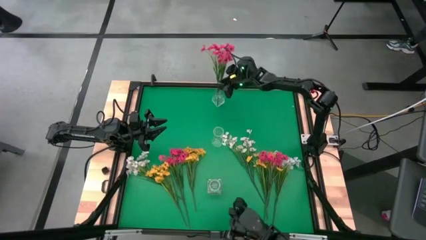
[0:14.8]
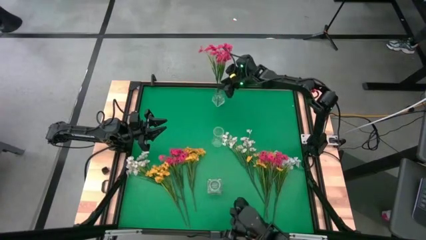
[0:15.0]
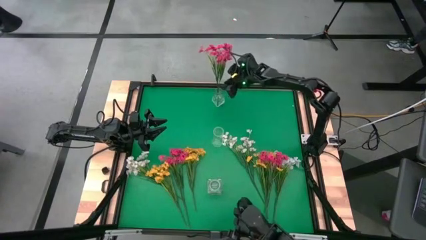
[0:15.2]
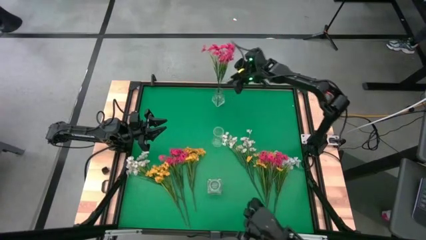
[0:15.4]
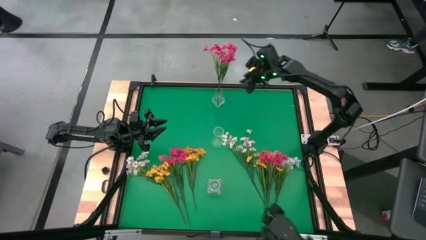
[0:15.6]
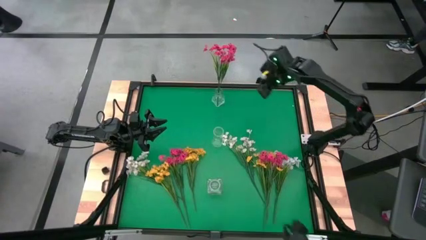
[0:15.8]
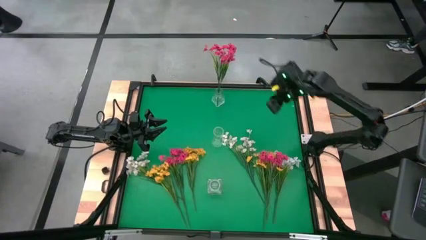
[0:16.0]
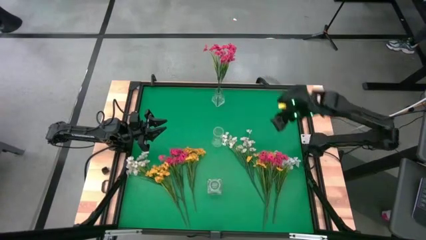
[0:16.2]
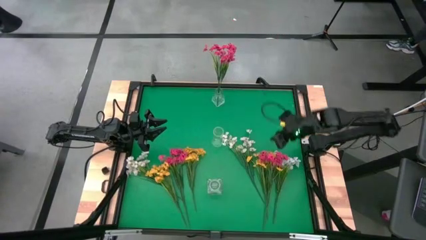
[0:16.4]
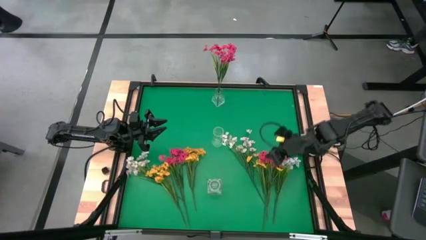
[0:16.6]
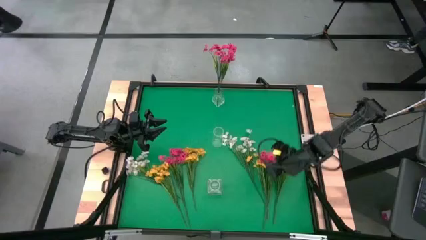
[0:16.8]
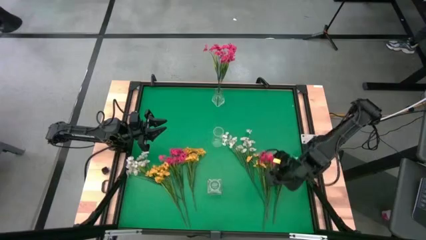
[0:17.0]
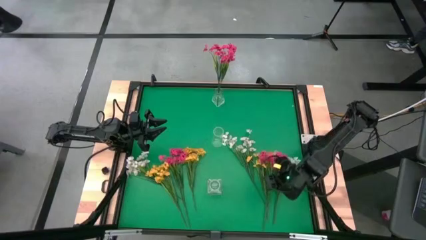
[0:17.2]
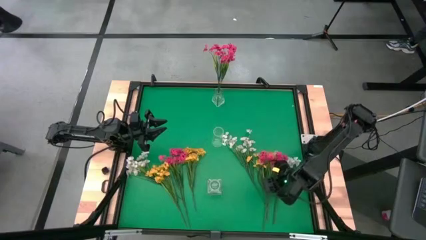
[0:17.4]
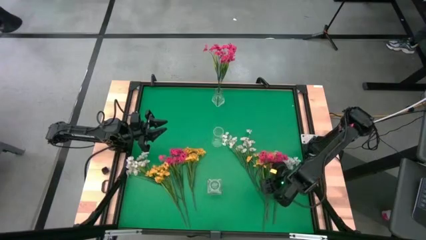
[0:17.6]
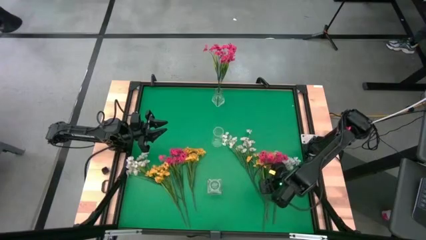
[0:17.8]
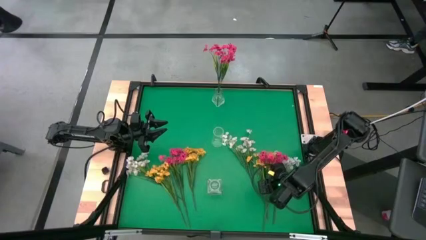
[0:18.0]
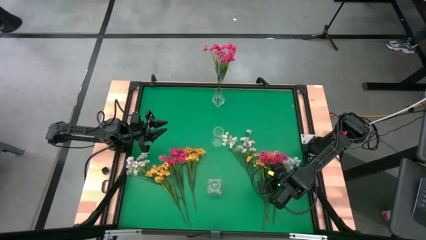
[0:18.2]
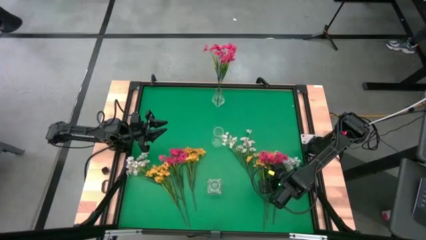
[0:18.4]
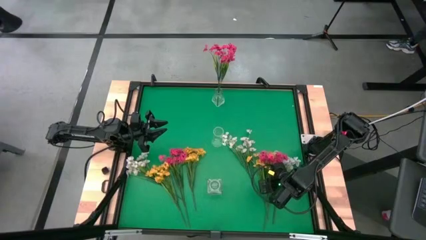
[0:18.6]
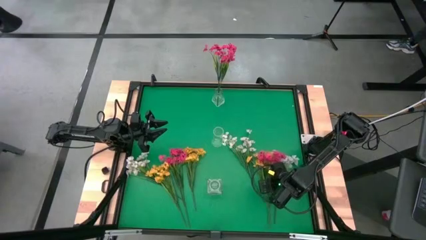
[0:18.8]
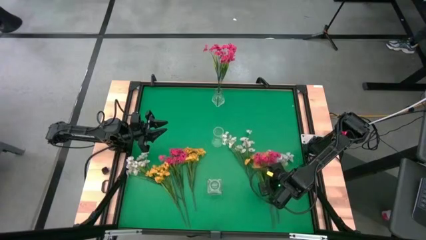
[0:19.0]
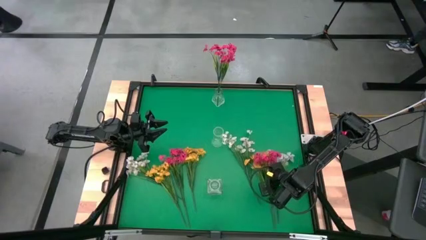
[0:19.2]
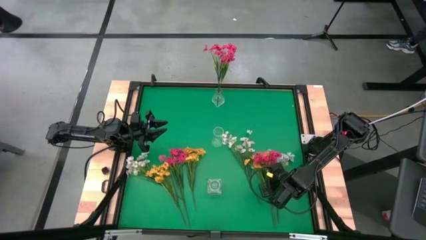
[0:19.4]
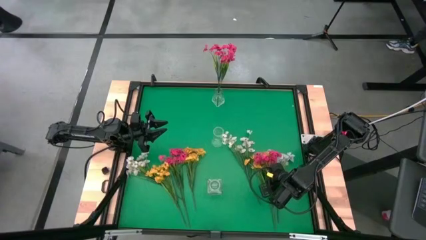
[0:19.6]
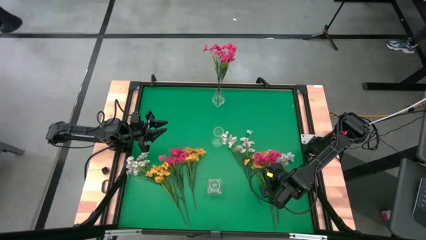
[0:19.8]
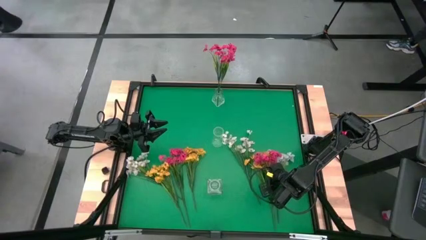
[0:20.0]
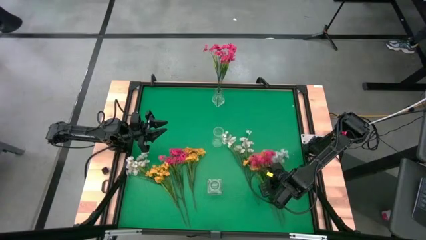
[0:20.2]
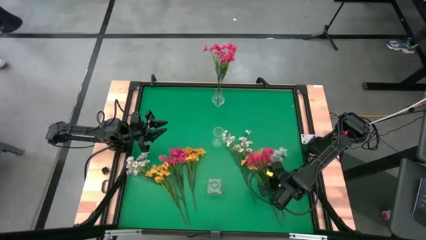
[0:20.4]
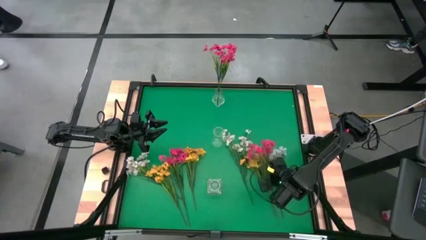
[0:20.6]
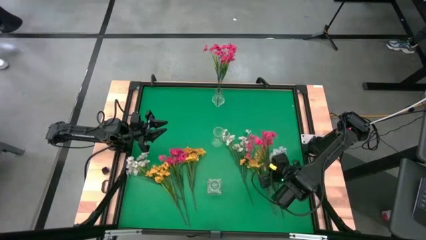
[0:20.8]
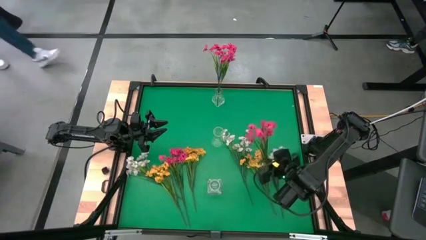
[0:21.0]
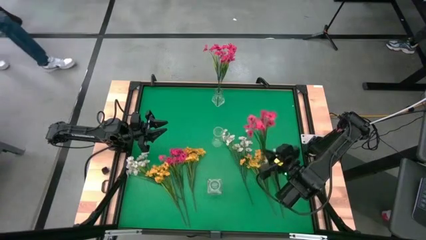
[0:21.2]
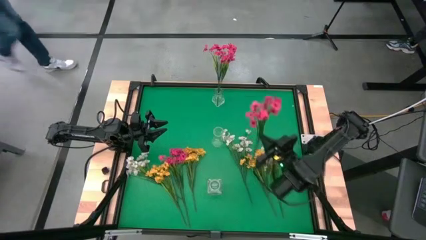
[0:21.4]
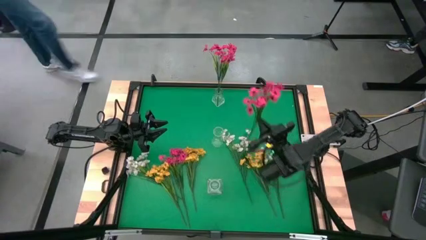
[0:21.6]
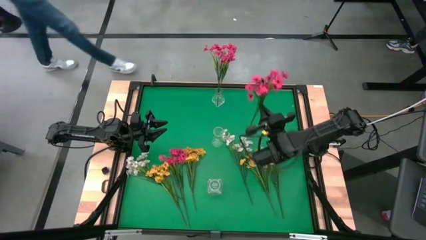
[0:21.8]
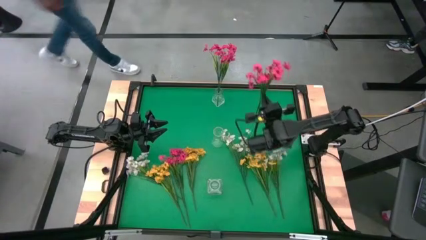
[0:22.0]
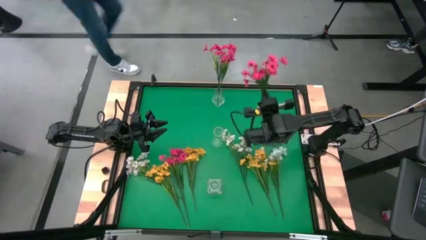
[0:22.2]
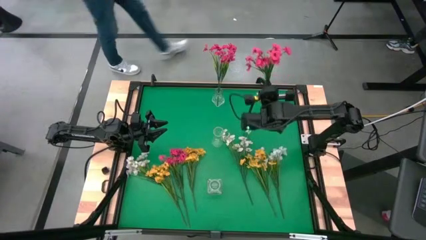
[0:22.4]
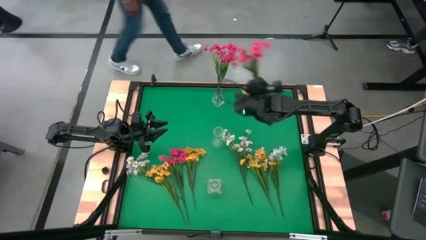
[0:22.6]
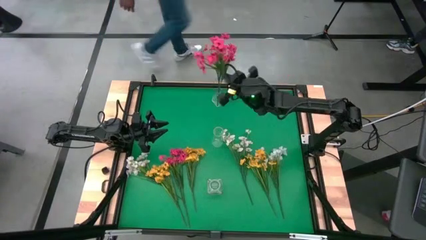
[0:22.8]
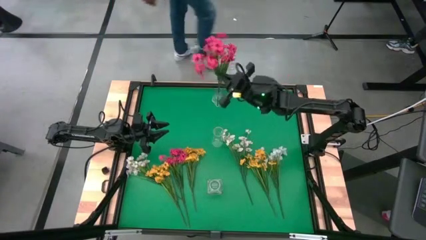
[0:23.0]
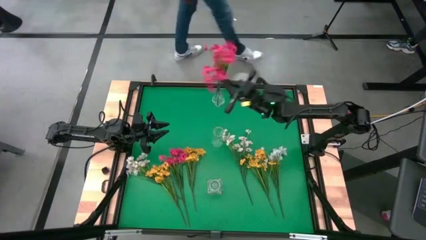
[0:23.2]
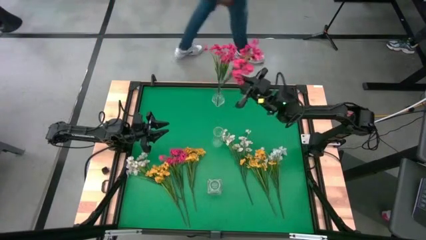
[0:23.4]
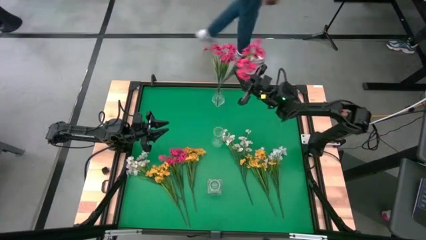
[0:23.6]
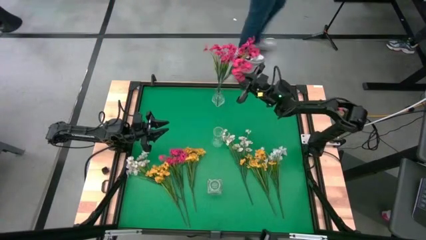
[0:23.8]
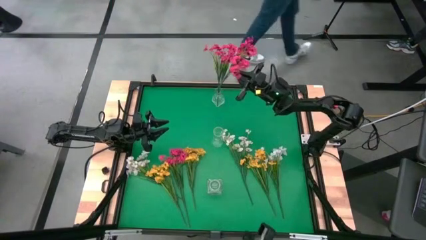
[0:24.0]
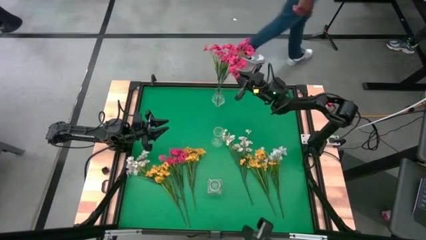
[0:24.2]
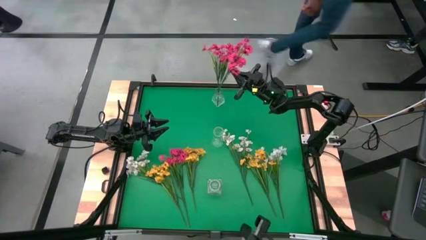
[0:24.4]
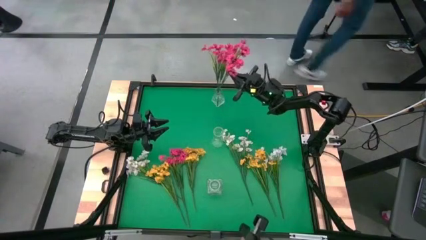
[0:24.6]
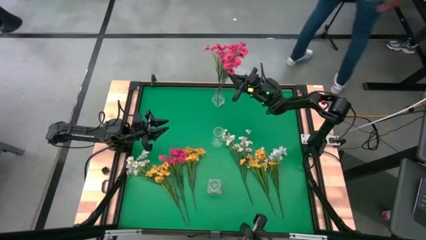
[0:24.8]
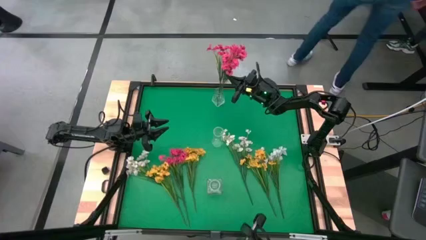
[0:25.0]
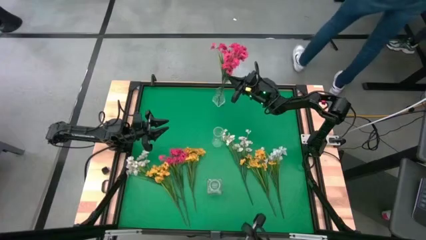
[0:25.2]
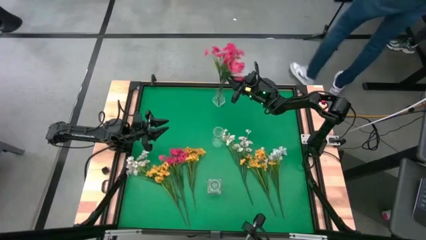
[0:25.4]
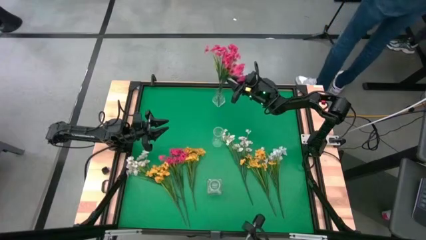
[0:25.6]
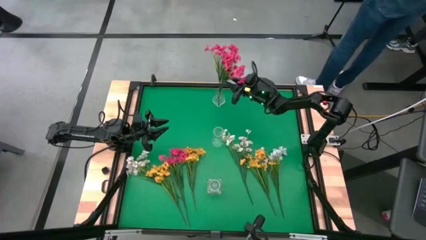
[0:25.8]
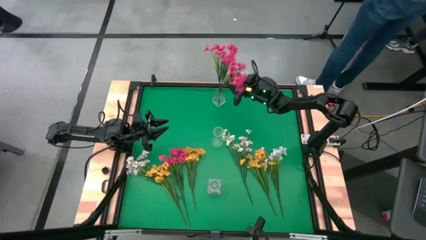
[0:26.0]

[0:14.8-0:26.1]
Task: Sort flowers into vase by color
Put the right pink flowers into the top transparent vase
